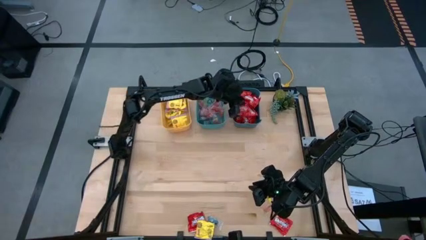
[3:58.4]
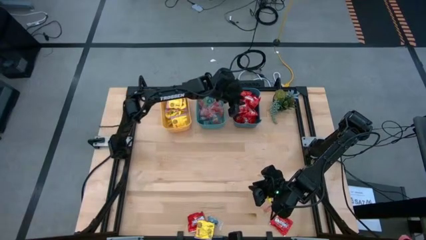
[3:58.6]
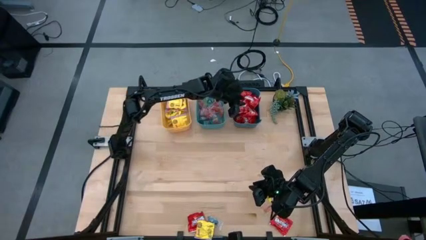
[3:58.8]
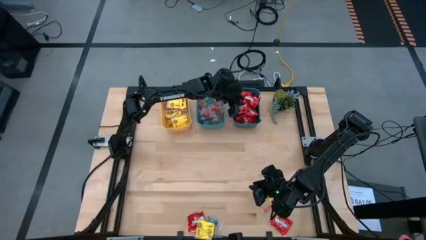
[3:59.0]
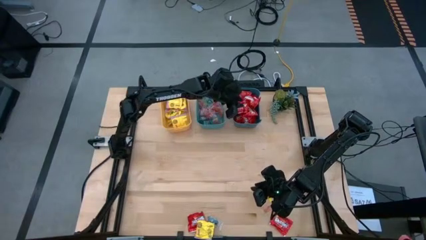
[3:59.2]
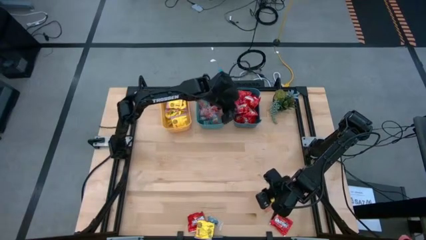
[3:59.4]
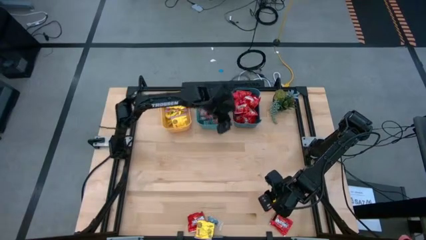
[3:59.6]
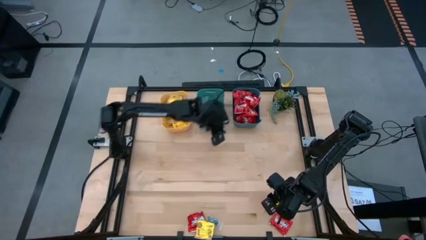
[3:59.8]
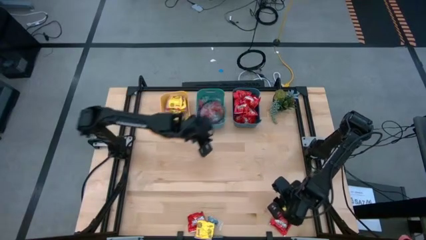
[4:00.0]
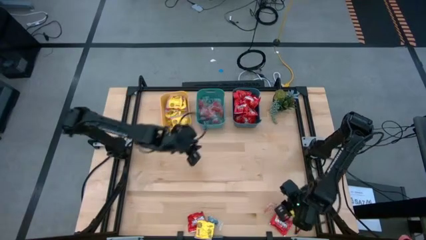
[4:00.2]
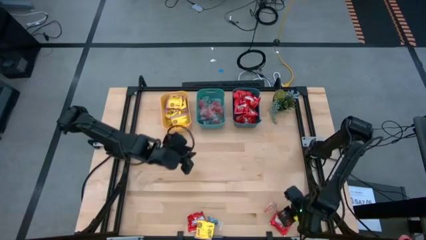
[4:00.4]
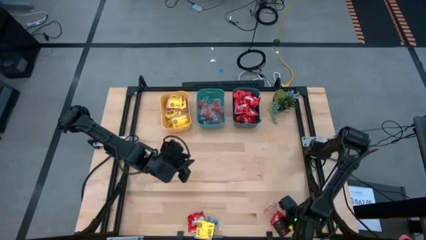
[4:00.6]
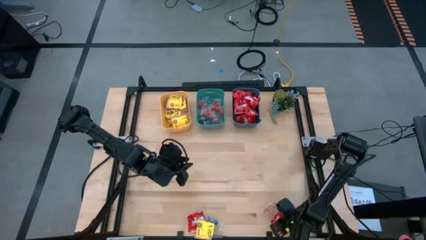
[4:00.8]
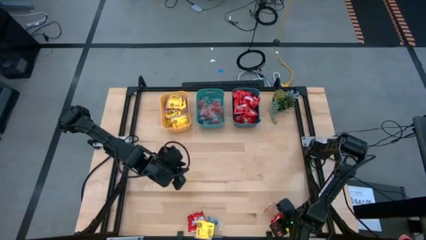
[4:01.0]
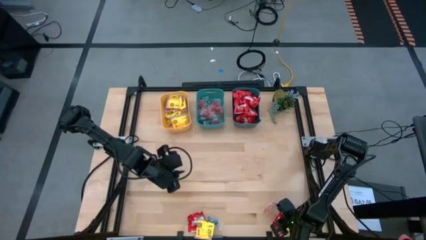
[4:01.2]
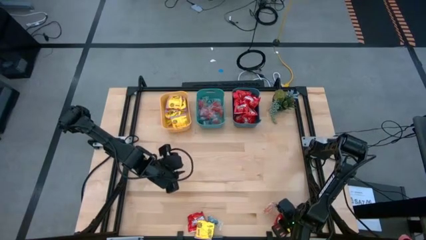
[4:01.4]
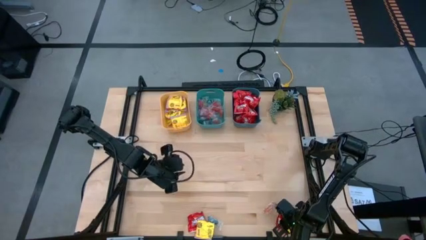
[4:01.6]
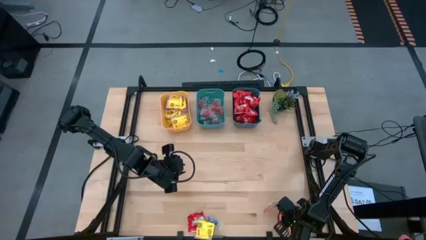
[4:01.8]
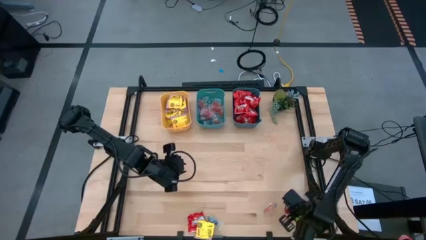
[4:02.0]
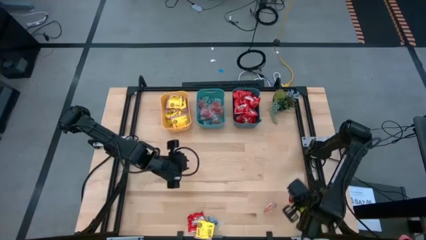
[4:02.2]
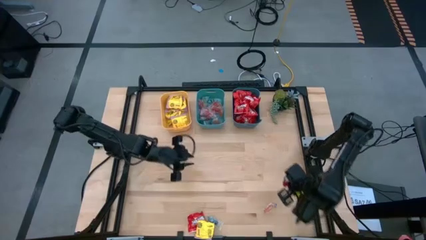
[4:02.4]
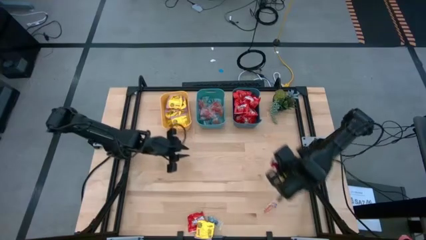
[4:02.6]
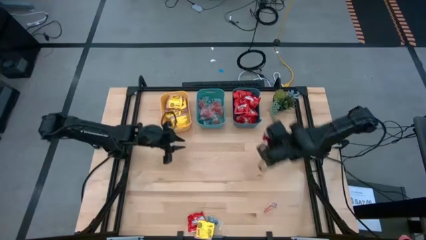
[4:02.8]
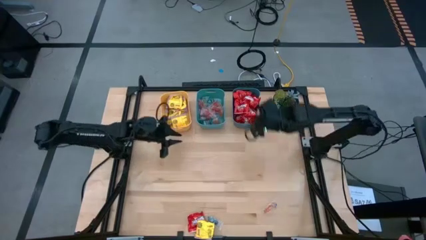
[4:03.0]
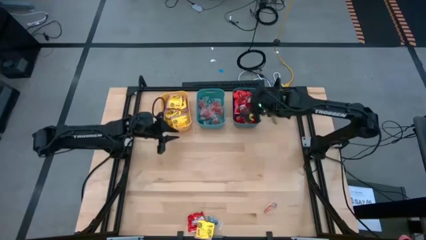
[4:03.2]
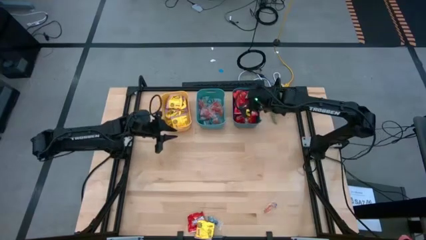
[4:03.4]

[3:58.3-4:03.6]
Task: Sort candy
Put the red candy into the blue bin

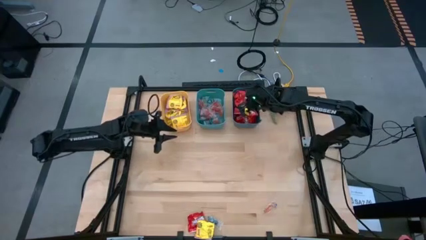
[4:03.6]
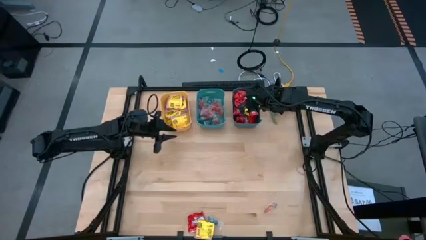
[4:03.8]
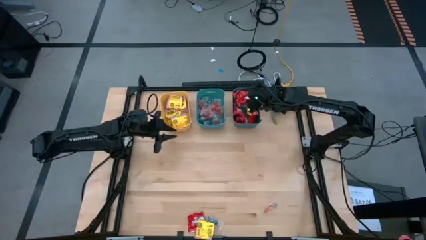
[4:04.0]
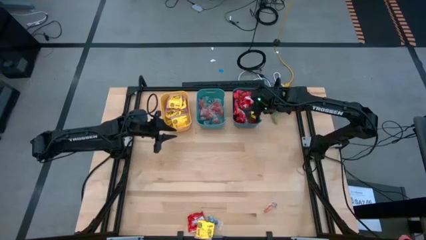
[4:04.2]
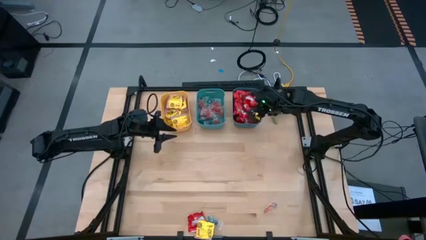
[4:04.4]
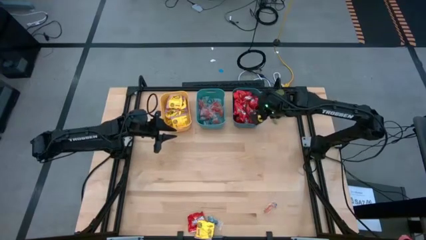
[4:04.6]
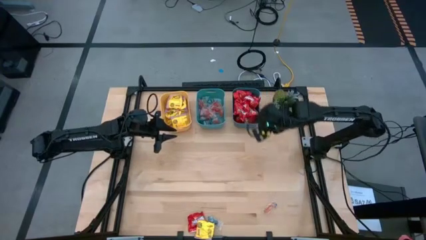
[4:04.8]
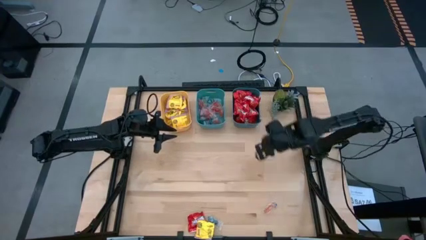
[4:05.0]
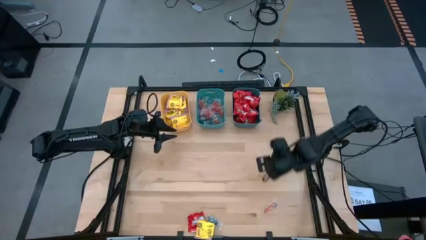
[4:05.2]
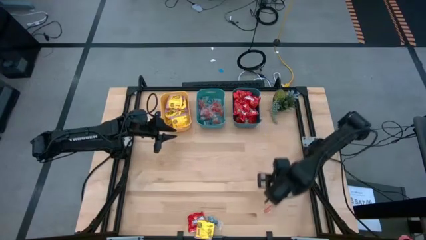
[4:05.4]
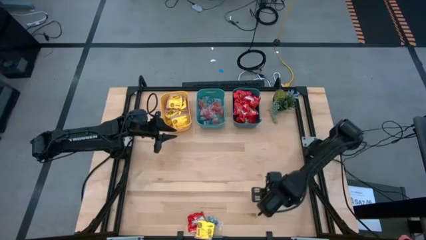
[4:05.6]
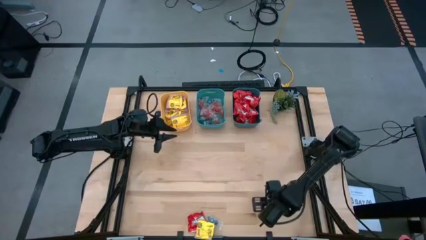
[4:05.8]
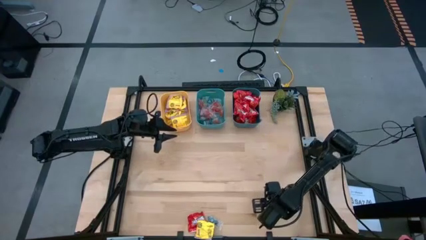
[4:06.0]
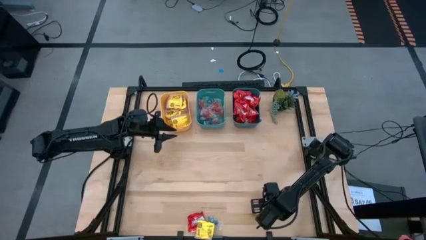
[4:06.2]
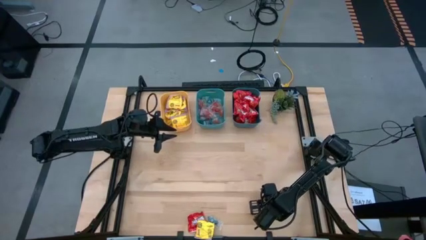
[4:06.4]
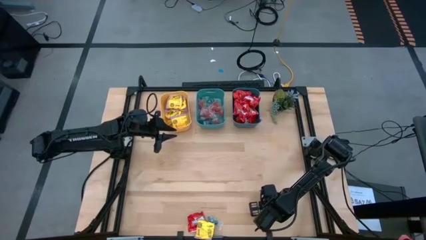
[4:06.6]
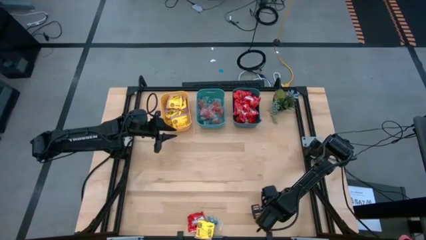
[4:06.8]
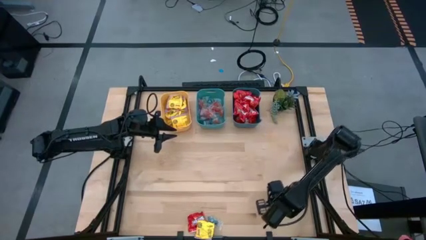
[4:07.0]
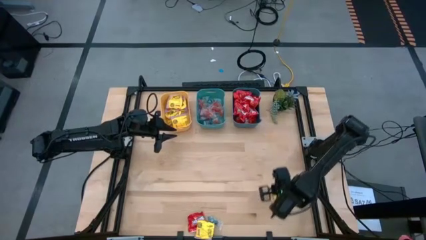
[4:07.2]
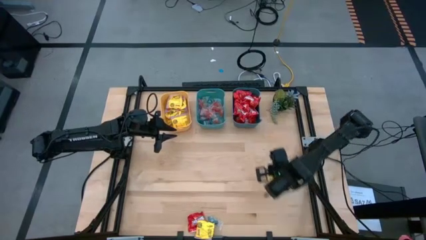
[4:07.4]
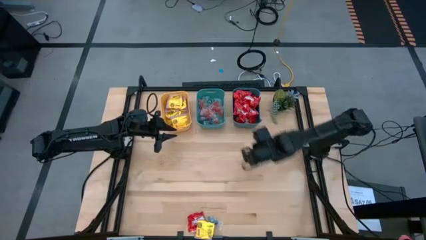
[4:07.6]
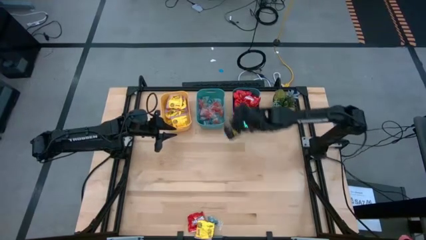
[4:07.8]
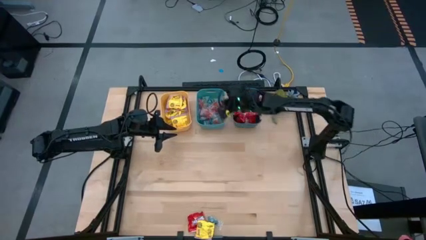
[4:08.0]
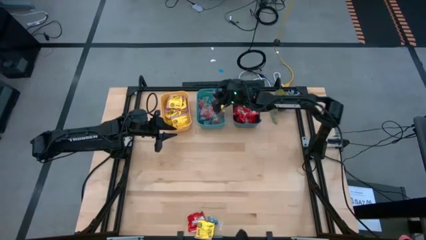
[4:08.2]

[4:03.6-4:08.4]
Put the light orange gummy candy into the green bin

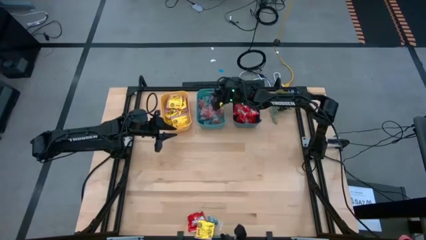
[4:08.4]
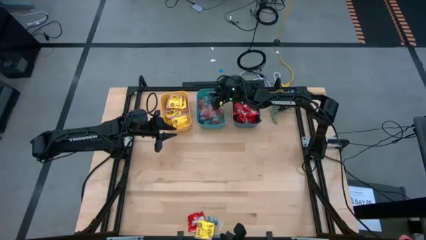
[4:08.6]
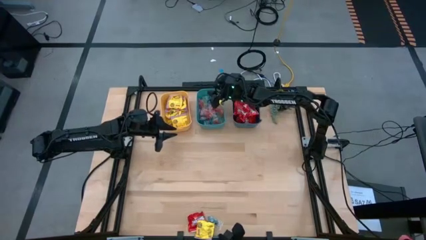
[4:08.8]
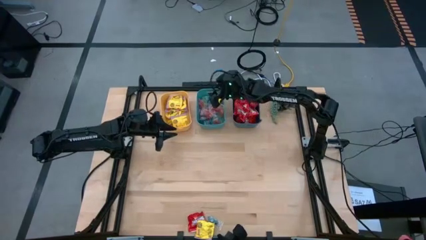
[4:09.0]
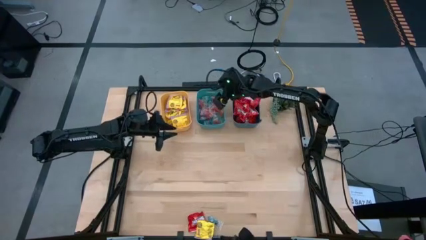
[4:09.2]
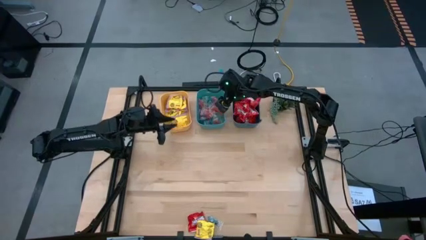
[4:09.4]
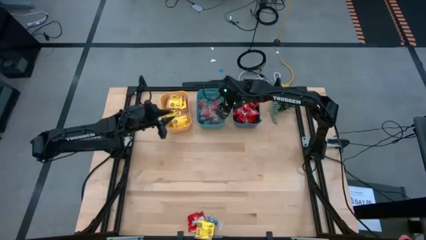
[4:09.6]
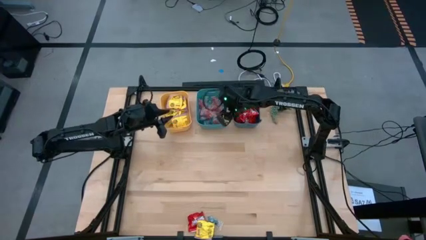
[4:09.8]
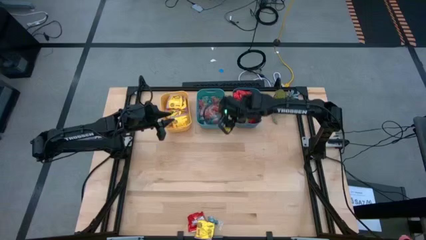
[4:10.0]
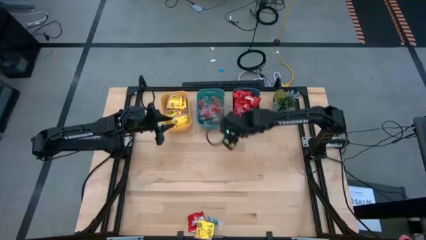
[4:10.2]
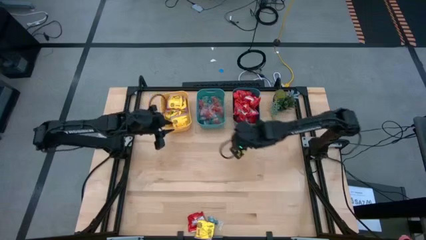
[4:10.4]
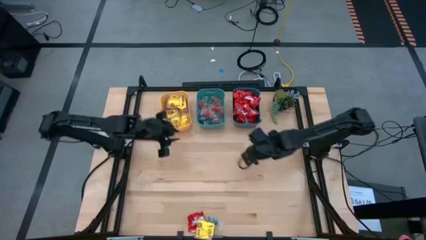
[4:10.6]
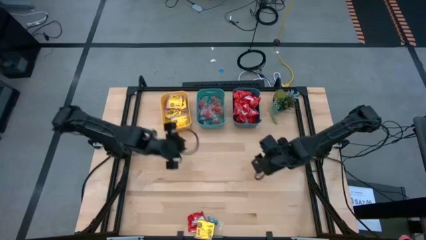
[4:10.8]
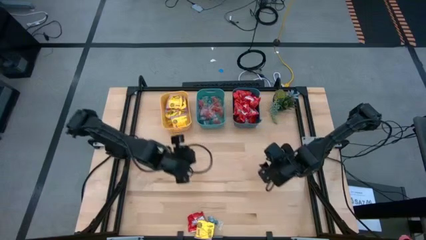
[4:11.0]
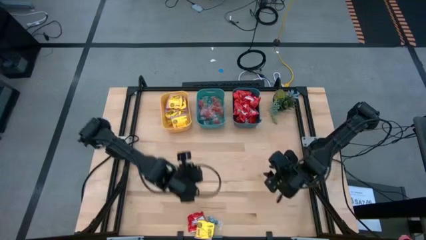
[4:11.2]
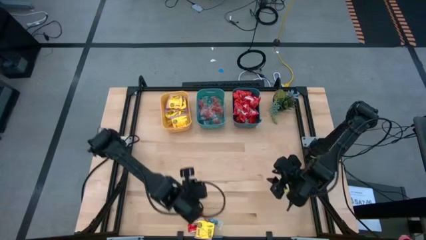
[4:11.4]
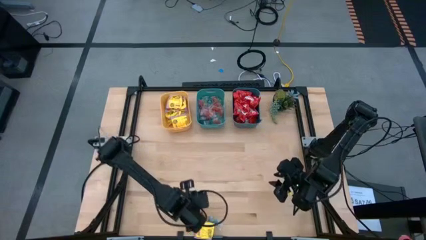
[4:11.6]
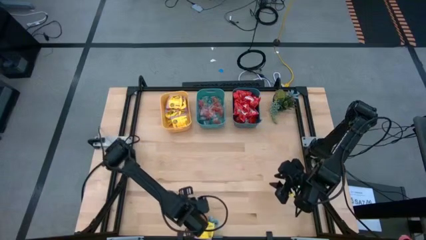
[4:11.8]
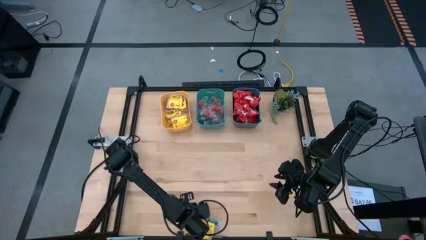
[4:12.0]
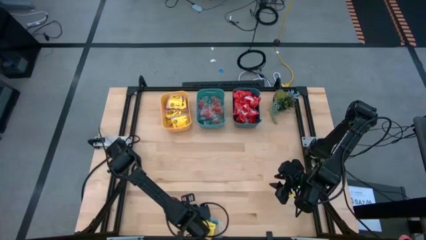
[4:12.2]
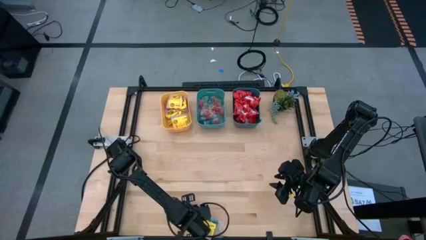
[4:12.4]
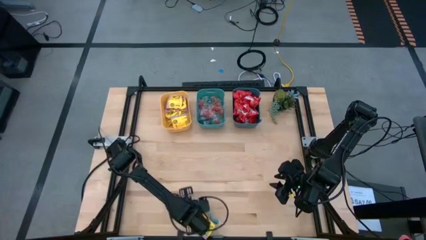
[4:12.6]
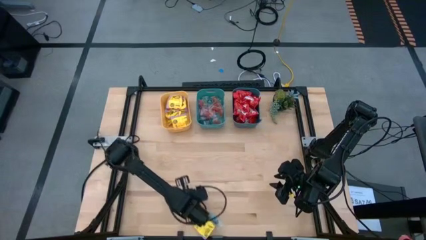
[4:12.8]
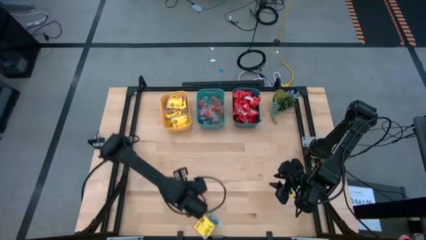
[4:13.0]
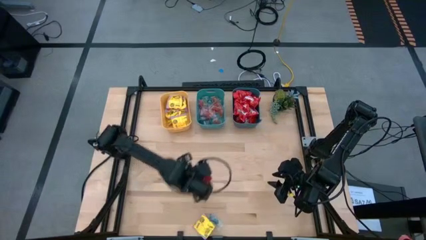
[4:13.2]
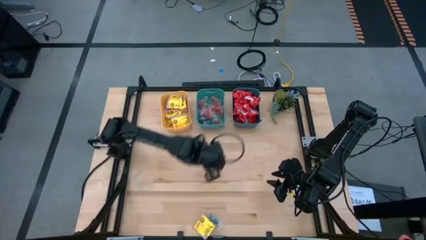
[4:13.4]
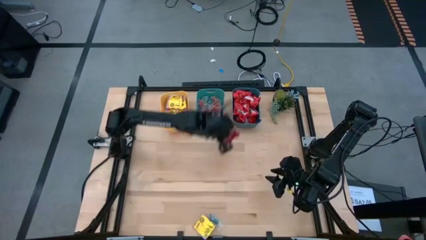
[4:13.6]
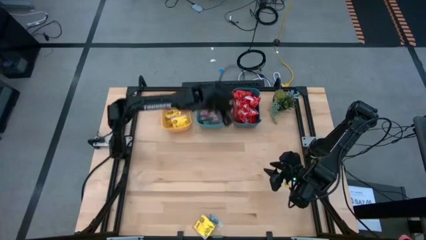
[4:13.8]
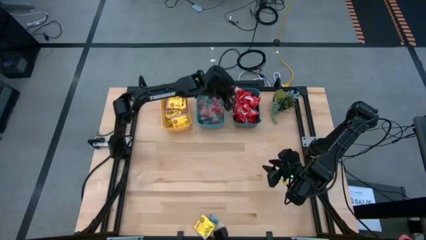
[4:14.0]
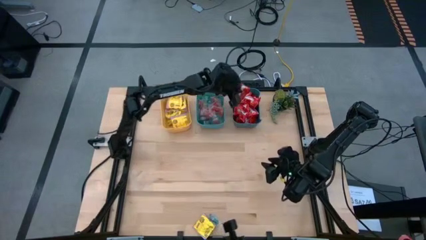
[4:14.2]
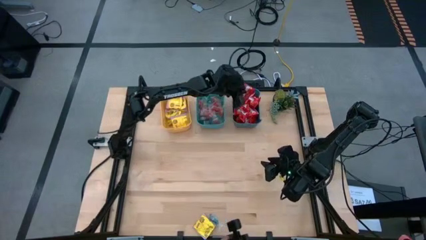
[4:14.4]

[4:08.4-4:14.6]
Put the red candy into the blue bin
